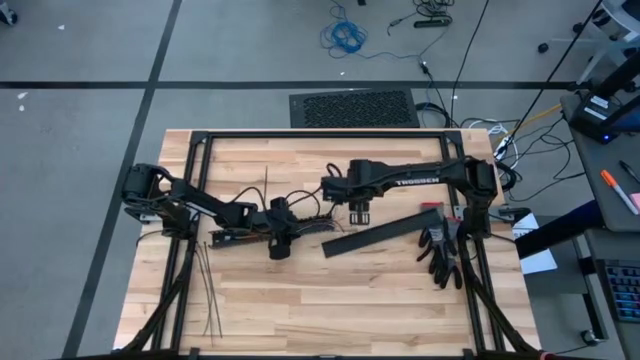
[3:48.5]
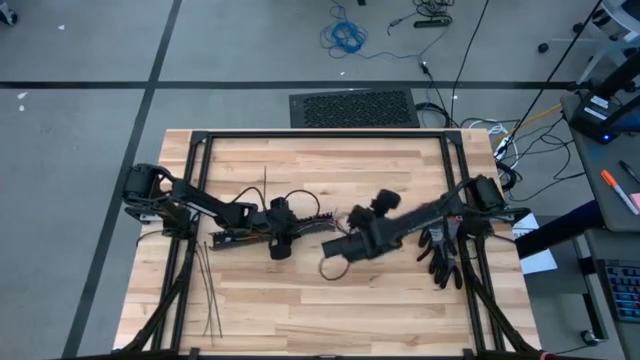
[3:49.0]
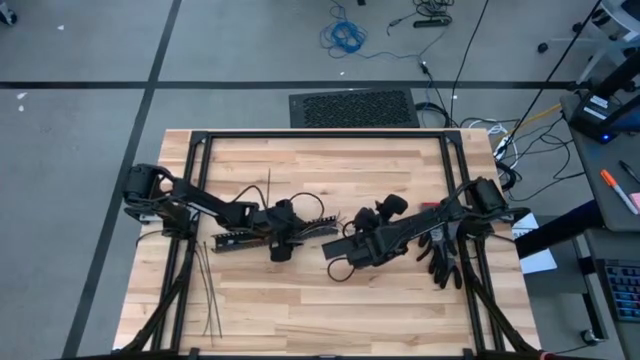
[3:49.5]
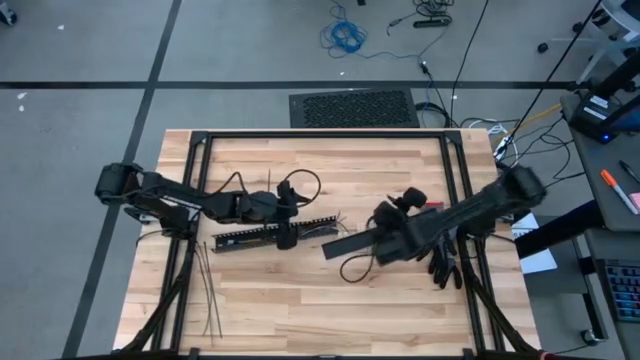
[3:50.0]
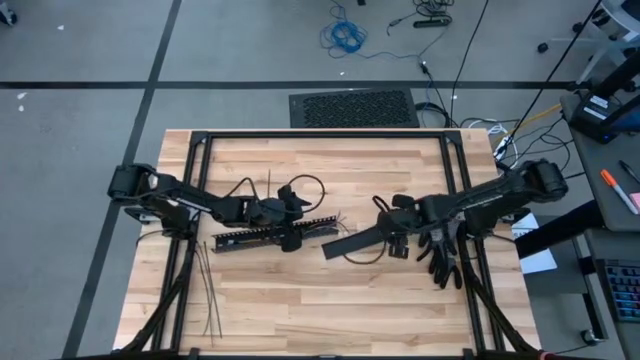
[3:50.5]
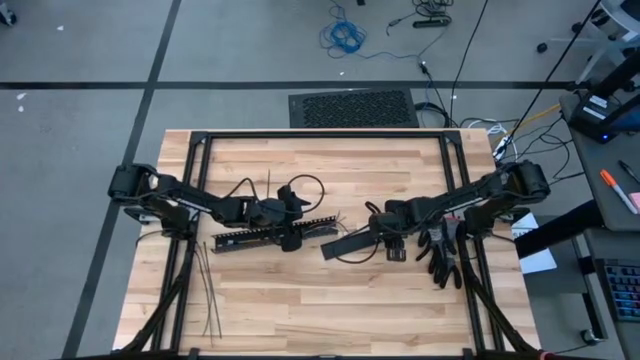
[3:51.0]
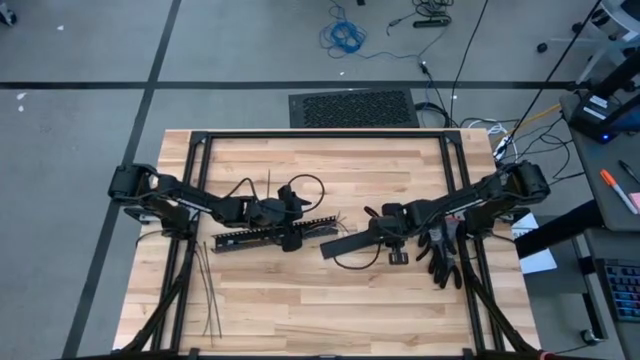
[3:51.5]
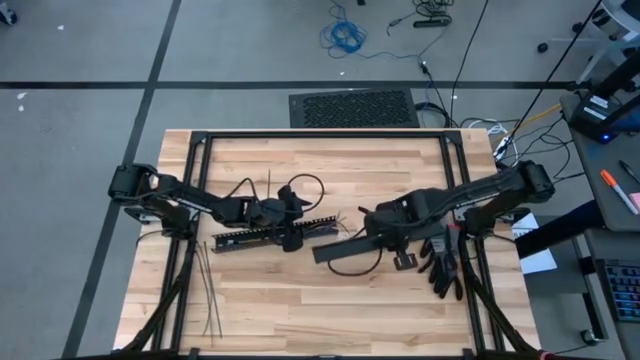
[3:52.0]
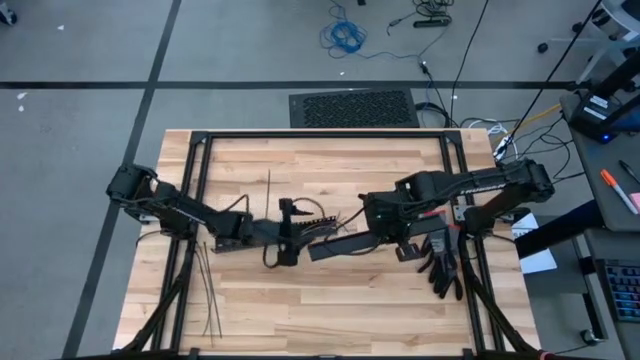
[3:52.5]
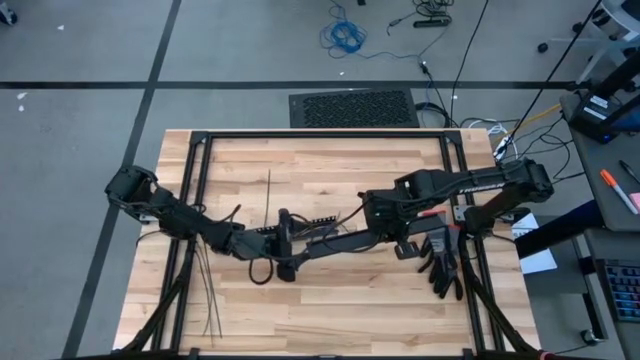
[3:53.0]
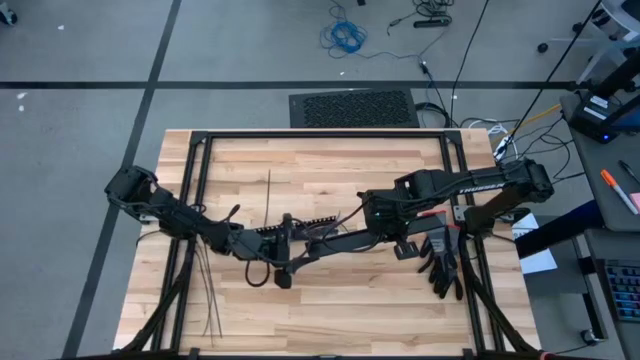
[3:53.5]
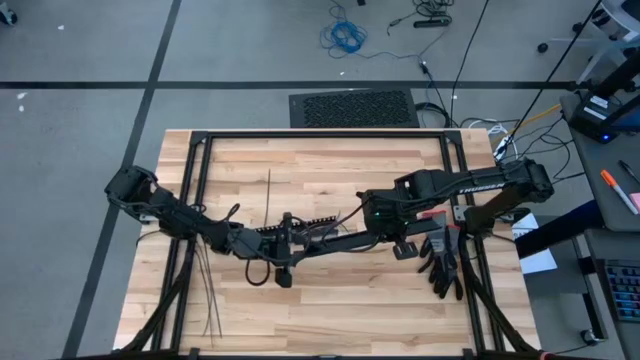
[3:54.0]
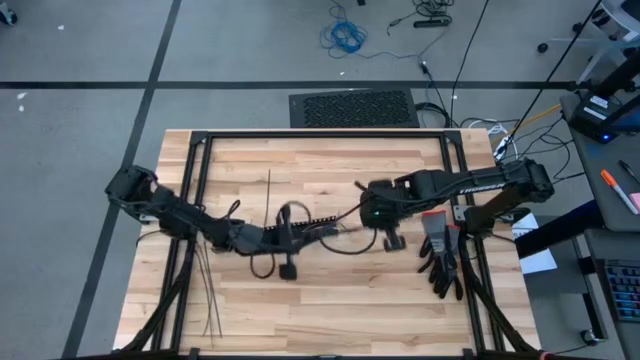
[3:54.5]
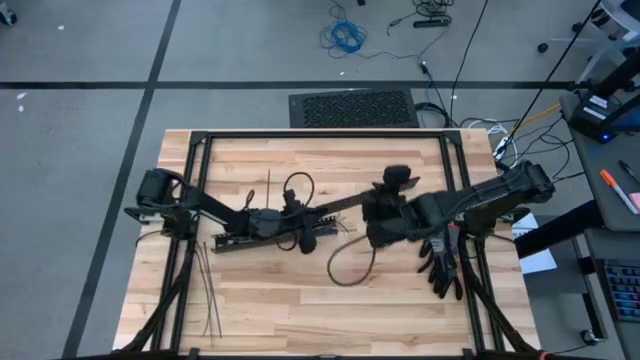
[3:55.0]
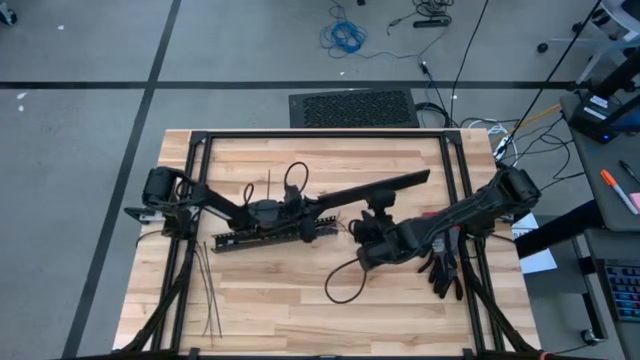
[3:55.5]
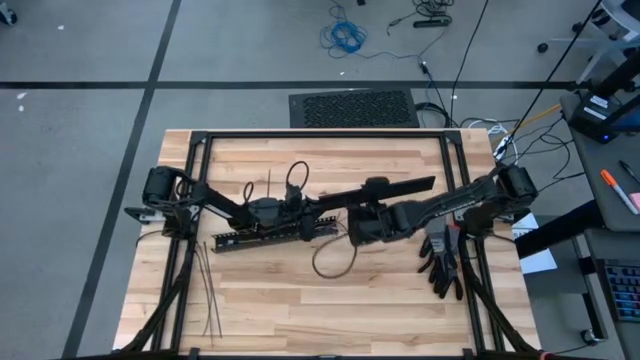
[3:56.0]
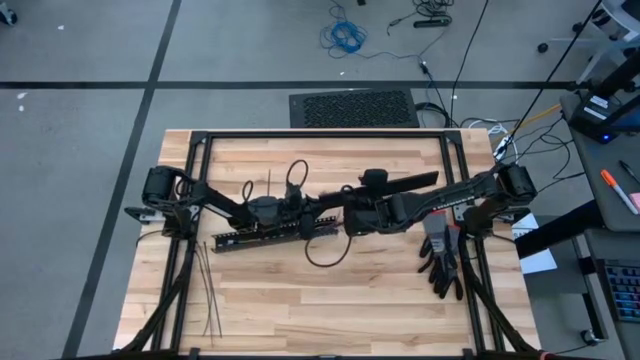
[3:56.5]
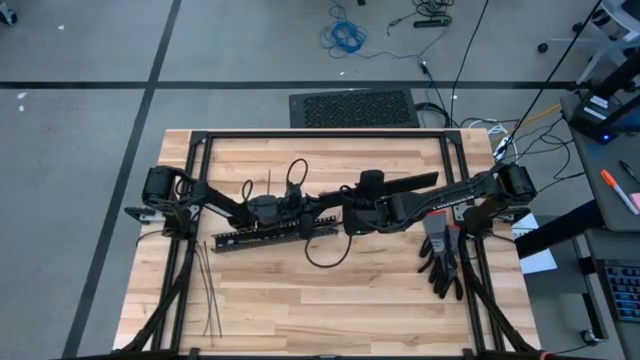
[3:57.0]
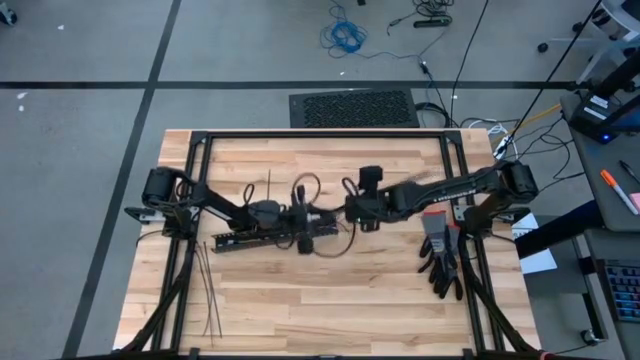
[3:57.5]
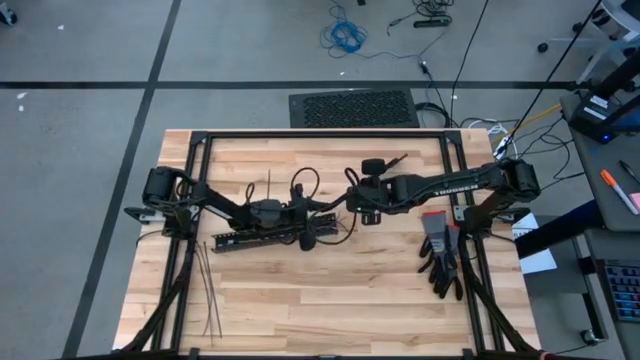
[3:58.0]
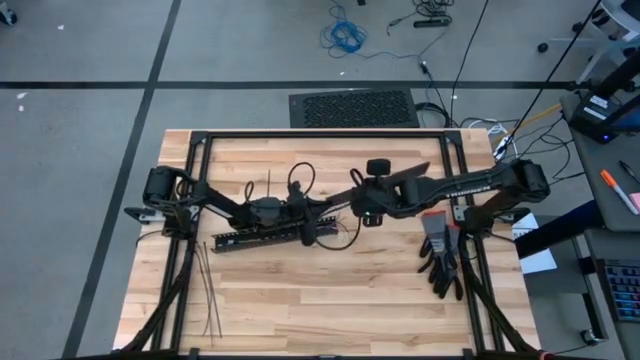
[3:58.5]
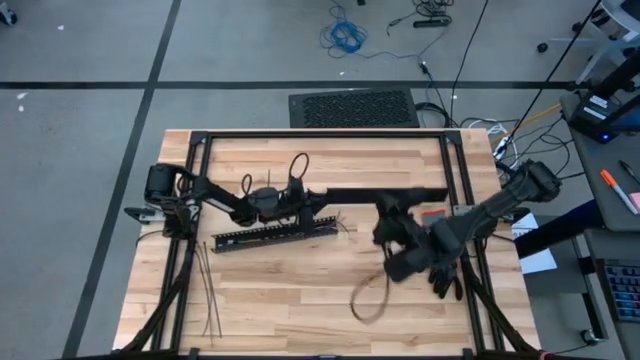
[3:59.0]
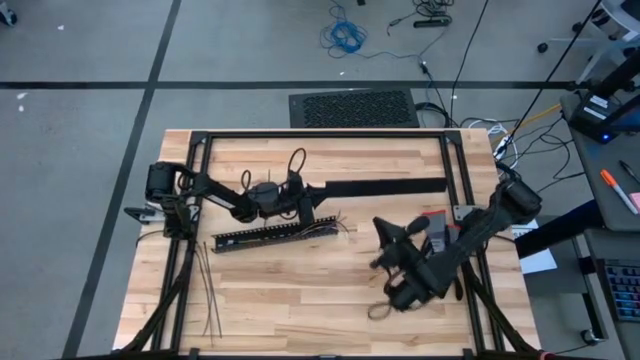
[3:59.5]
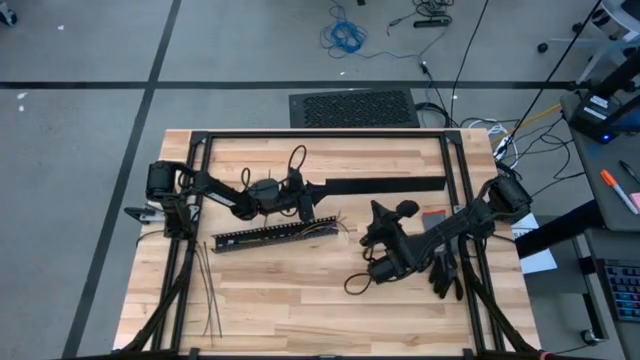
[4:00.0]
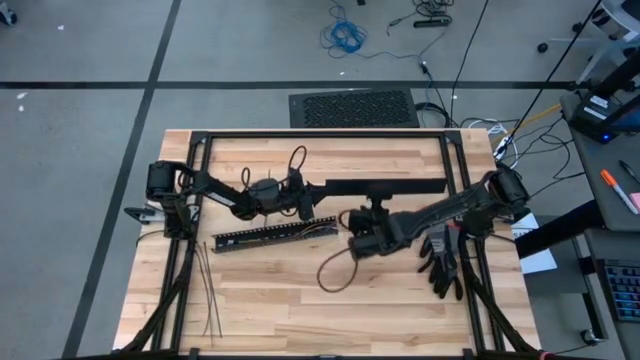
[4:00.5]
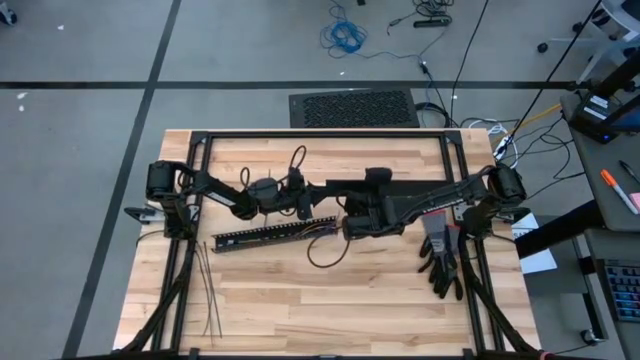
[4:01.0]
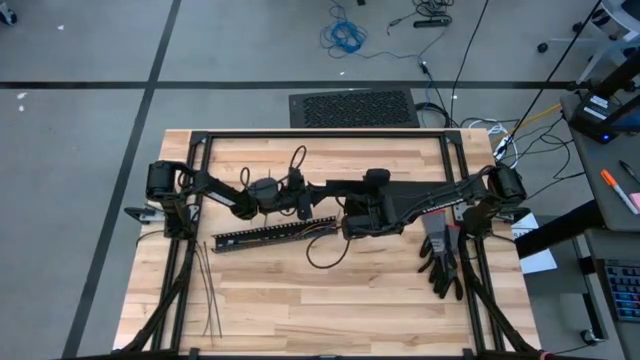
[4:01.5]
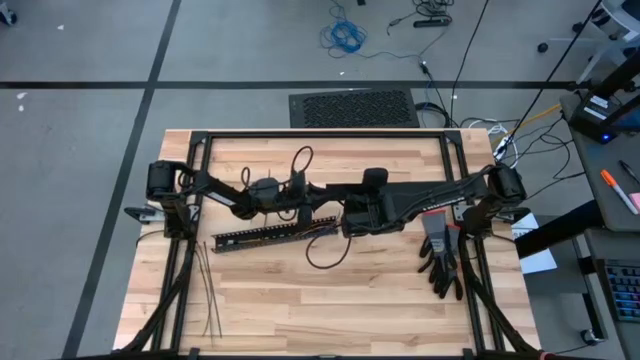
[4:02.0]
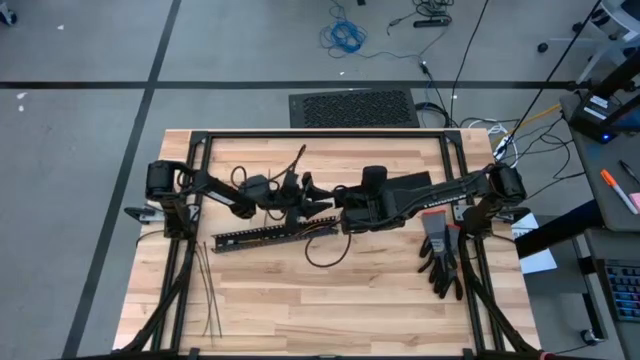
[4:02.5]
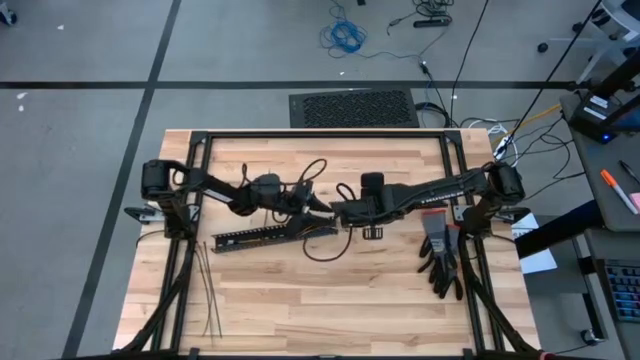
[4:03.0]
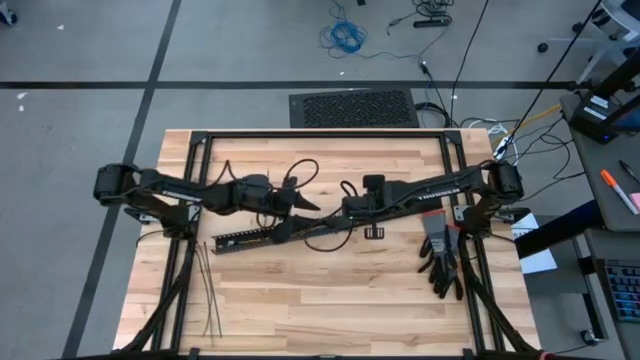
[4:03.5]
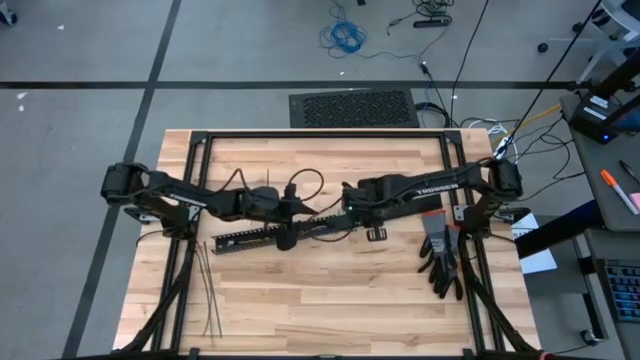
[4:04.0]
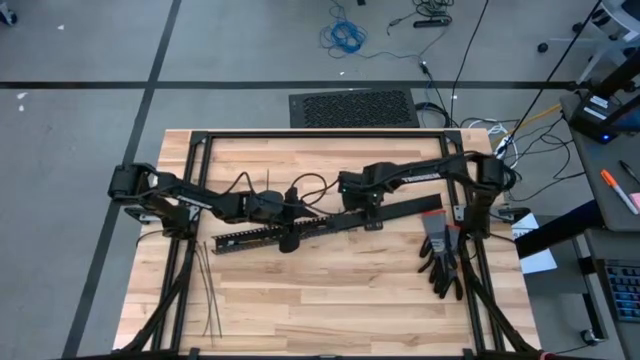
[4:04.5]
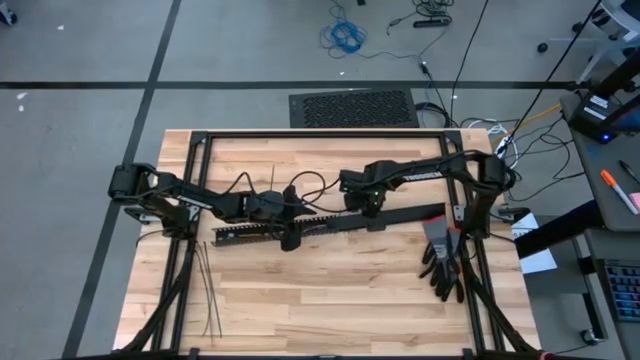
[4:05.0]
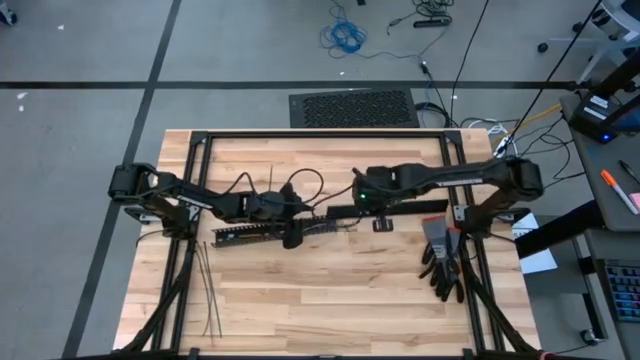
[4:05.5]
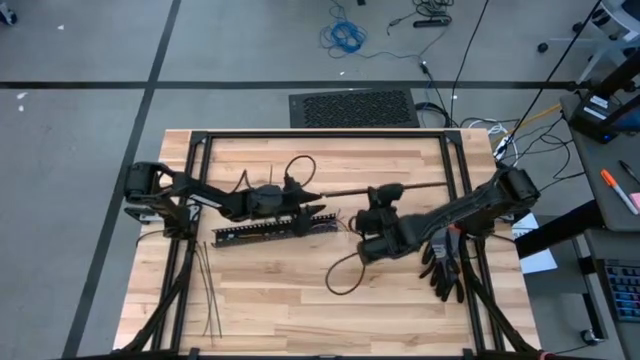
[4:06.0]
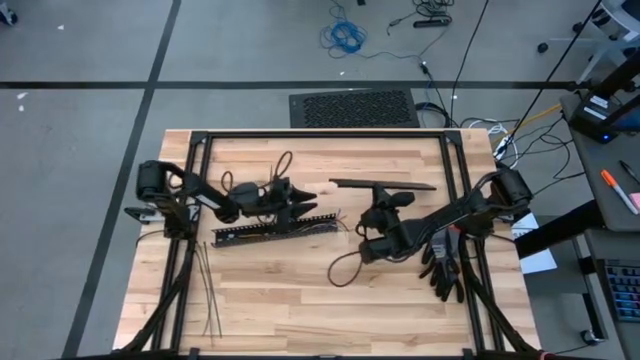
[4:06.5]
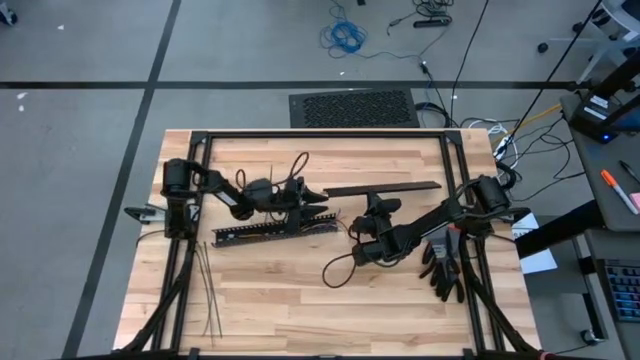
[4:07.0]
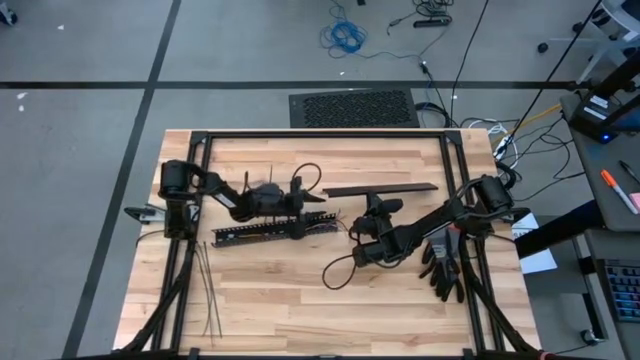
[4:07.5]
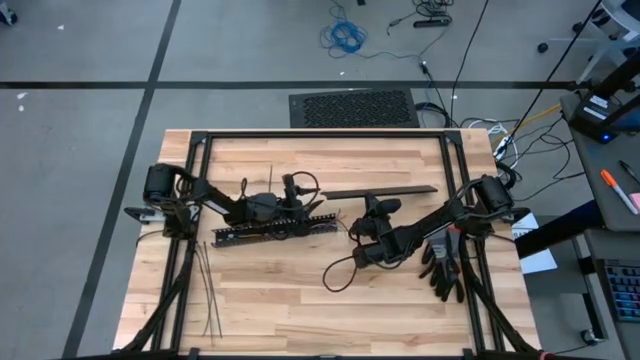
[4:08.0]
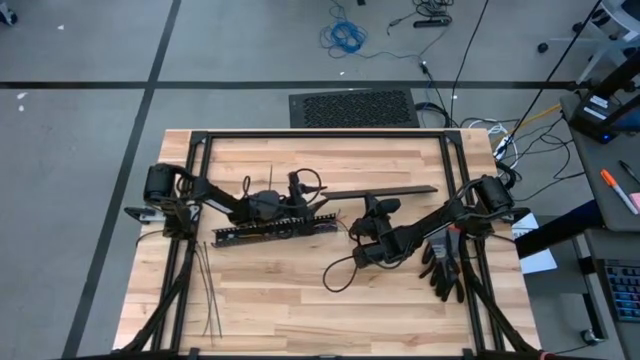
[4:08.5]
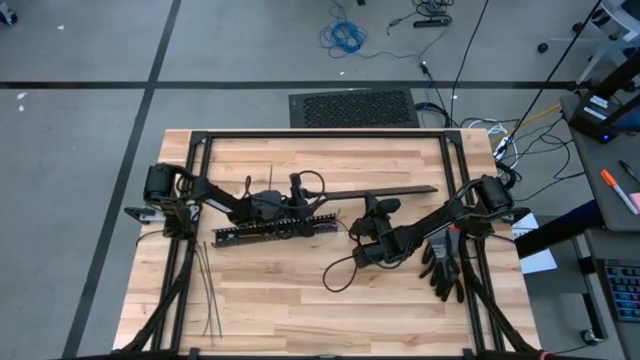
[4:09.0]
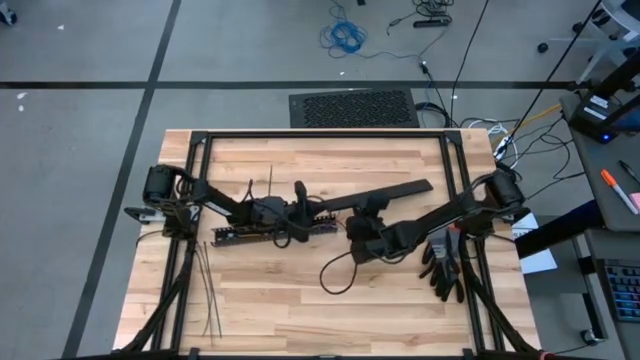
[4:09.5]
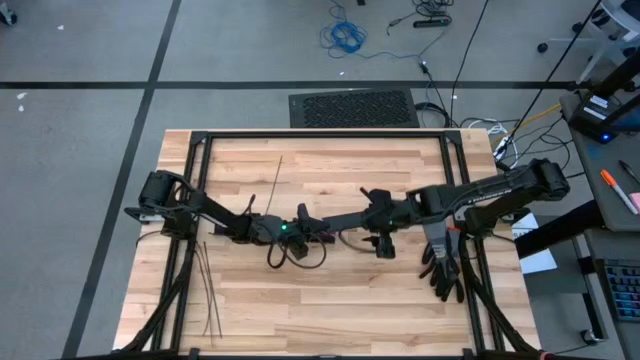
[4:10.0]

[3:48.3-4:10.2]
Task: Ziptie cables
Close the black cable duct
